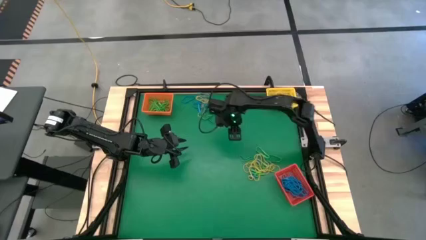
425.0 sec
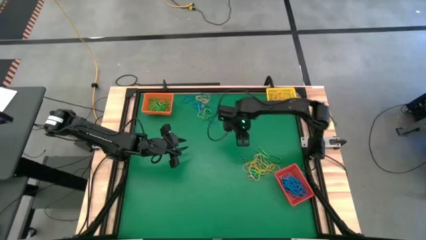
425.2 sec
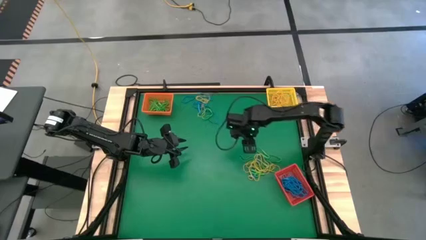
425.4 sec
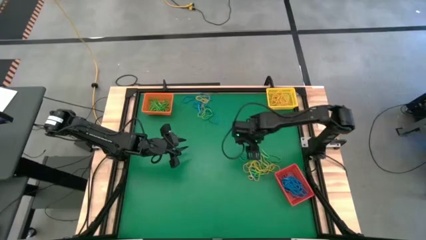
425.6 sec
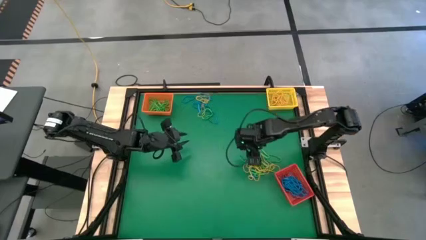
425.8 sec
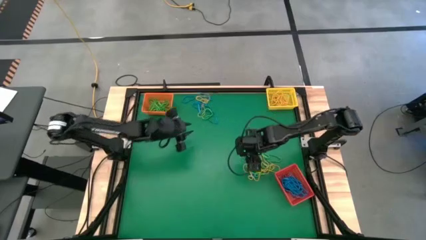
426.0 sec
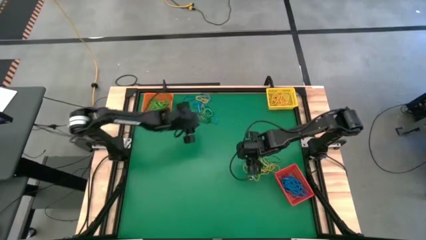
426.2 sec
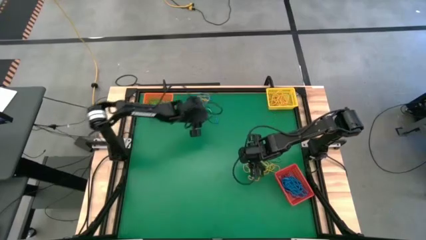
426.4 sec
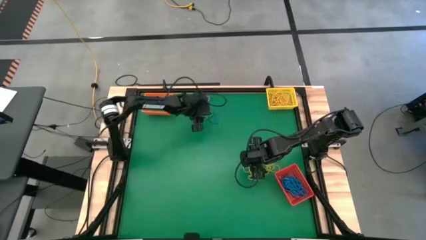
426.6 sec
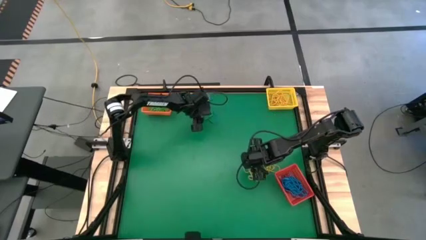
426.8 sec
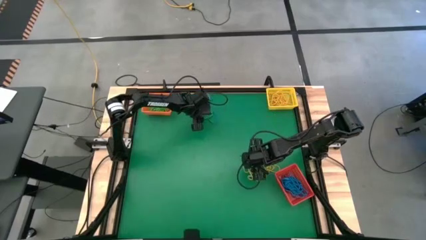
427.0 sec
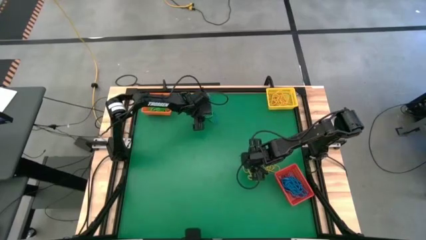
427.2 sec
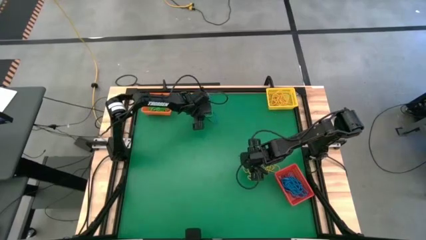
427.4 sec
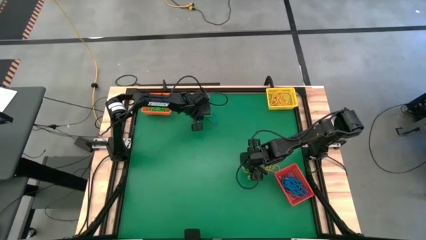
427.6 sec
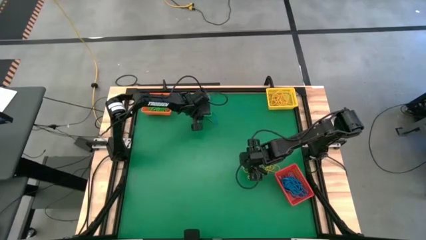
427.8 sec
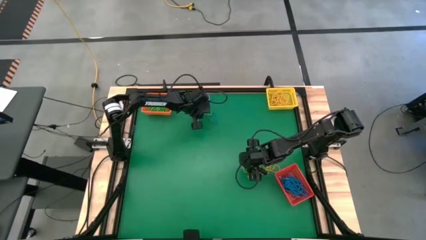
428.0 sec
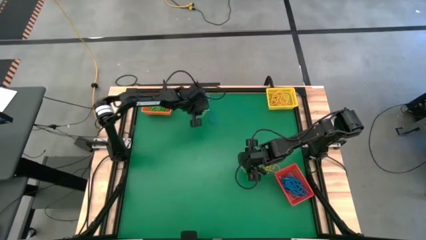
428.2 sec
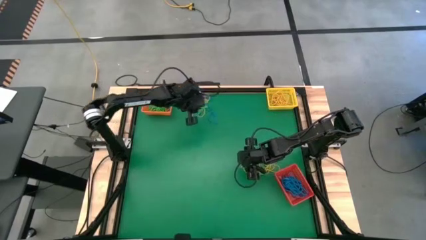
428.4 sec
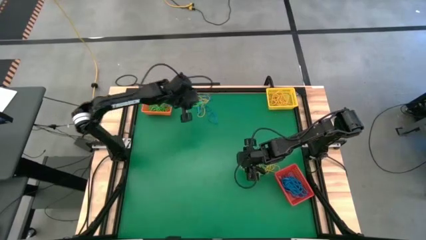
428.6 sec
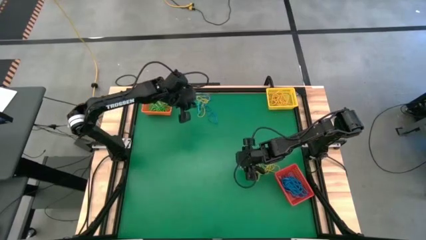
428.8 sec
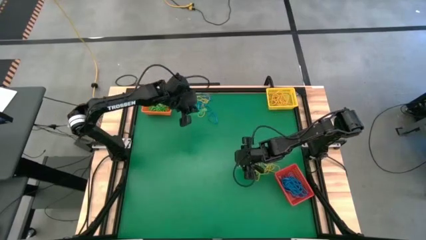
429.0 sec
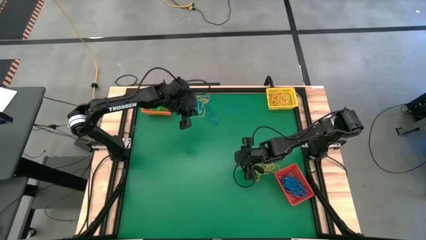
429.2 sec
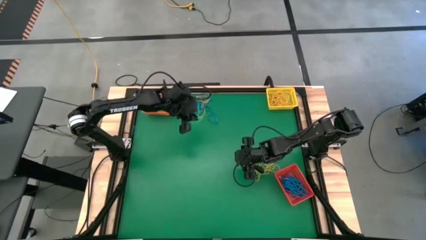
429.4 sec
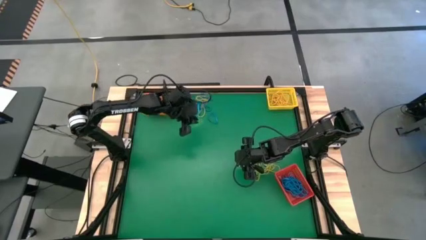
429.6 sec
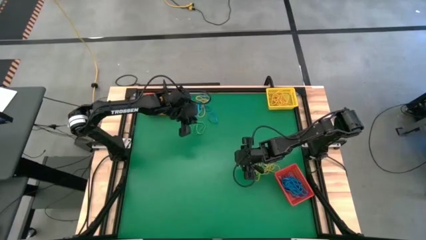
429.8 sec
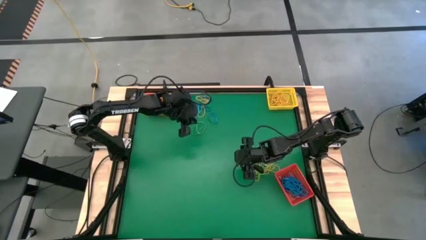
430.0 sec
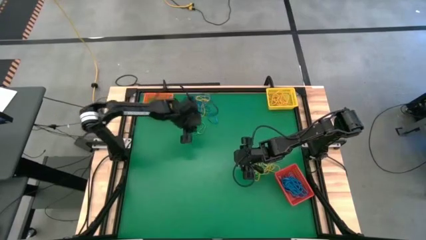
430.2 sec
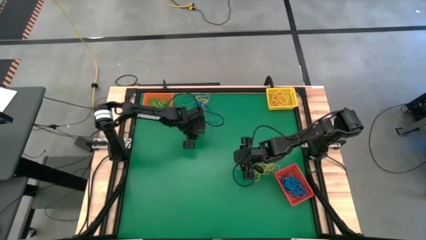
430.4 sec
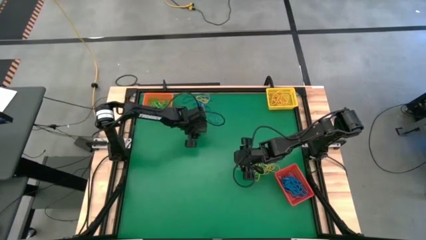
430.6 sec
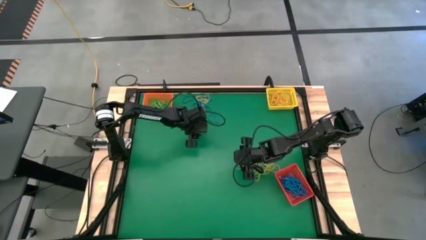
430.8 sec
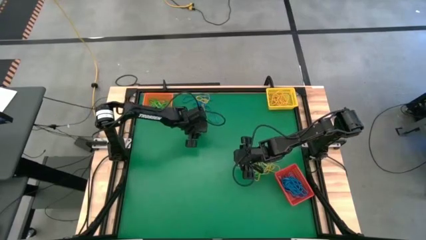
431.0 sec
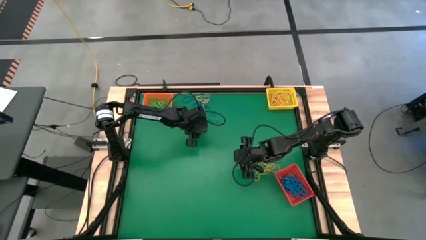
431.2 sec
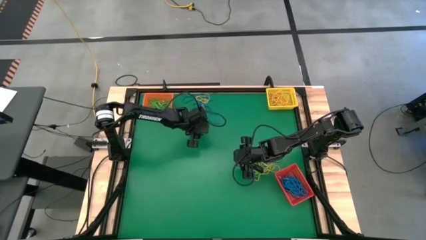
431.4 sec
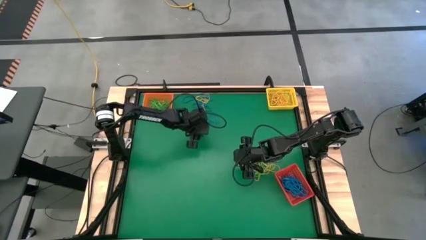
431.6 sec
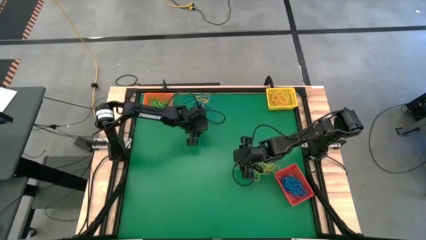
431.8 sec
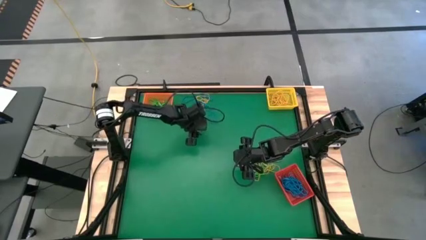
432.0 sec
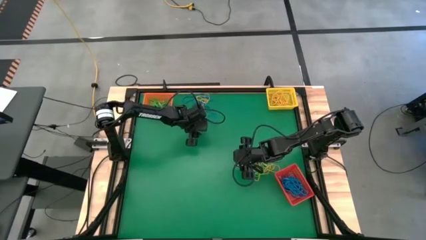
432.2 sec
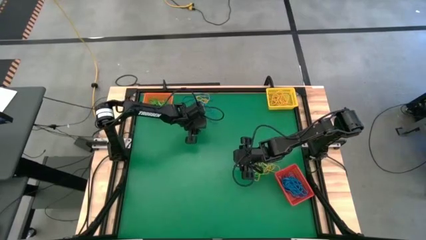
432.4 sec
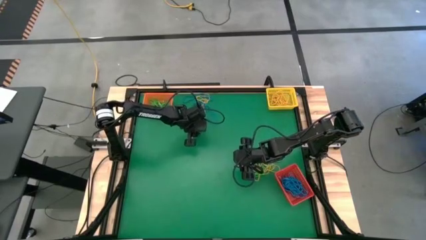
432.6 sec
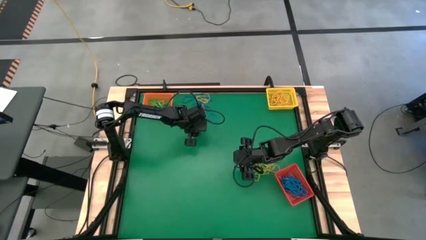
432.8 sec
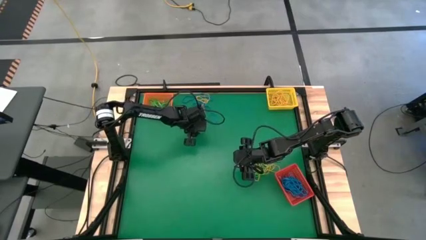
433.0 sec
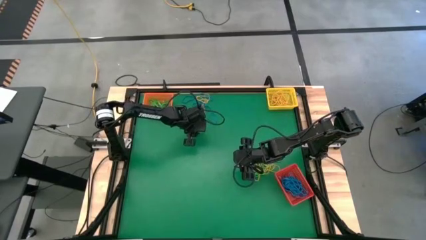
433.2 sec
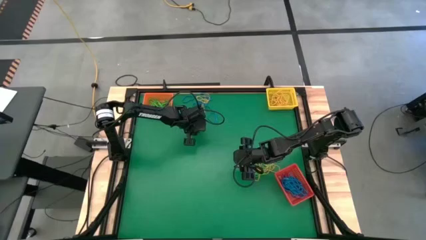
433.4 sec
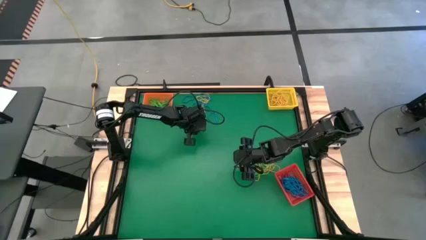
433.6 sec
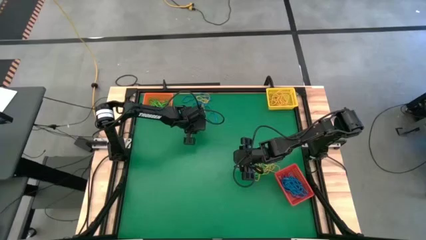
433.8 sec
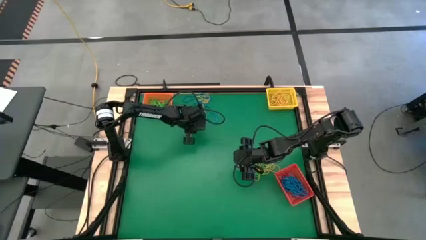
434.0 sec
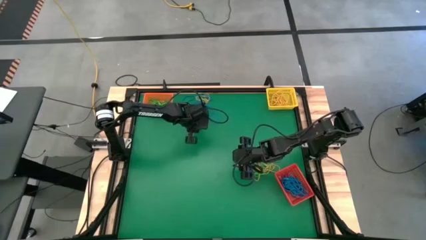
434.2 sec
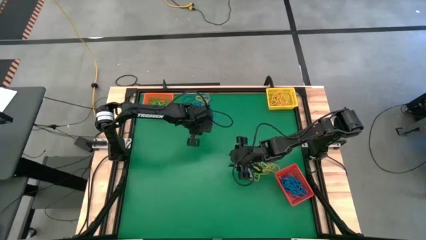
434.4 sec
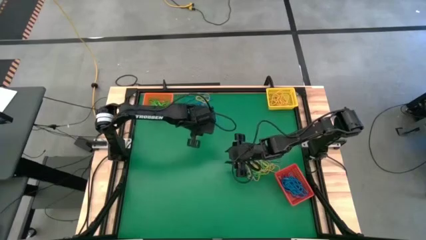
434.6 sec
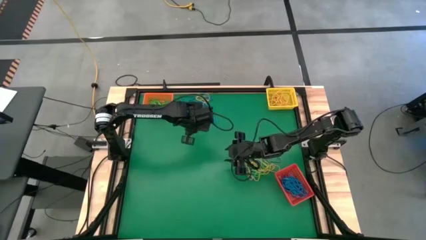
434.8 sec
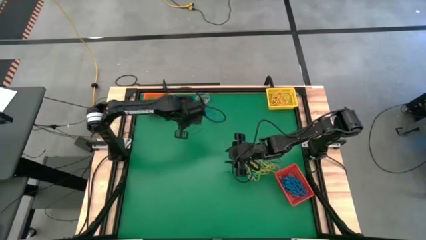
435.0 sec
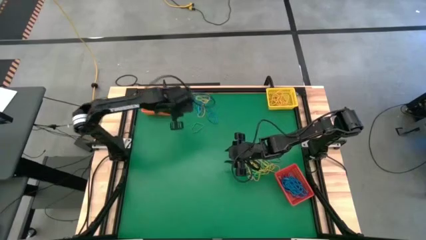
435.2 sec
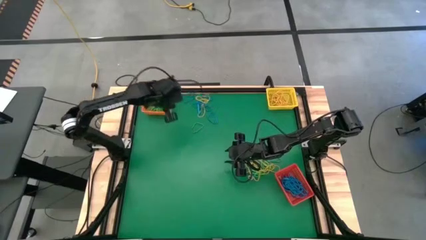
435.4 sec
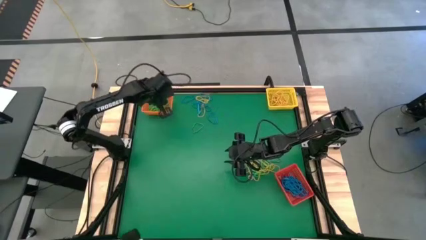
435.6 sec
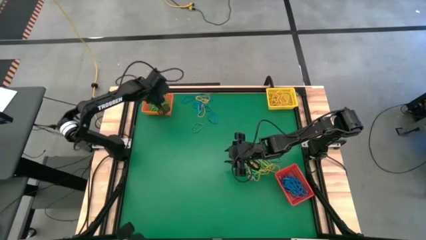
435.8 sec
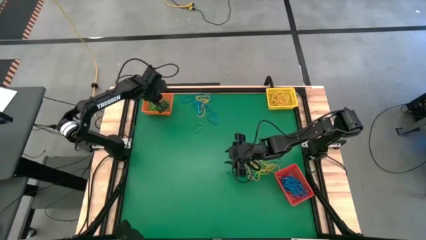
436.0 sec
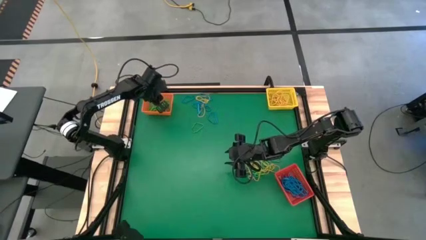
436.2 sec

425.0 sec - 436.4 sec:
Task: Sort rubber bands into baskets
Put the green rubber band into the orange bin

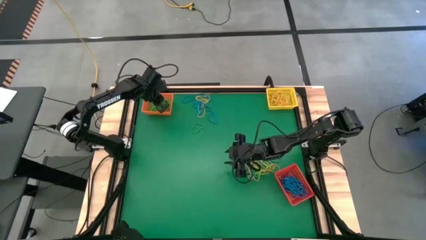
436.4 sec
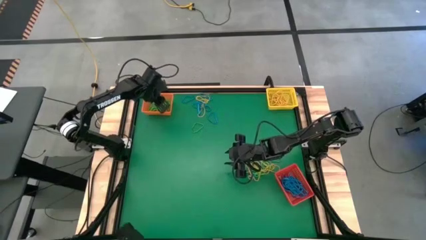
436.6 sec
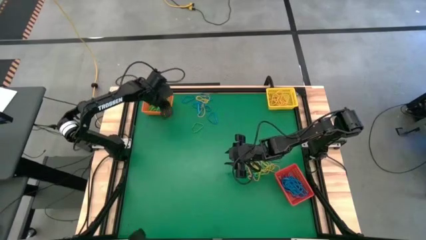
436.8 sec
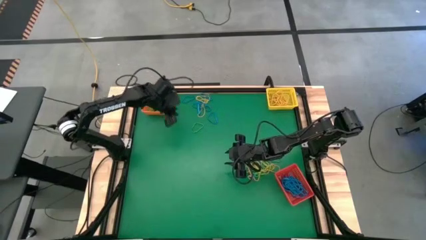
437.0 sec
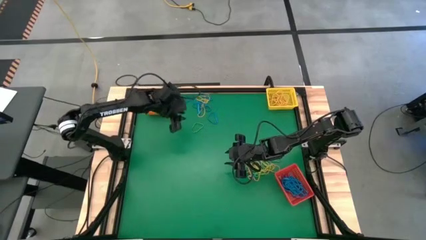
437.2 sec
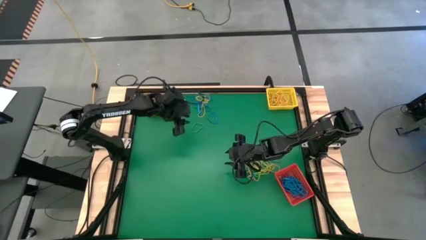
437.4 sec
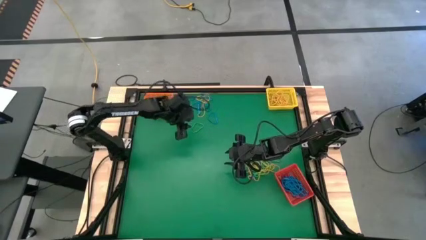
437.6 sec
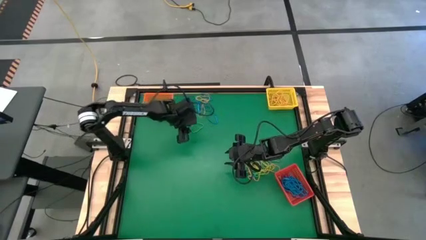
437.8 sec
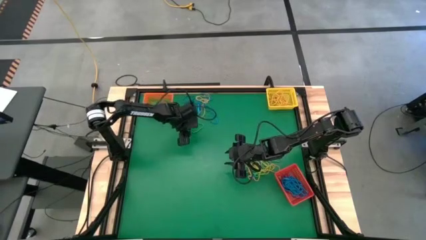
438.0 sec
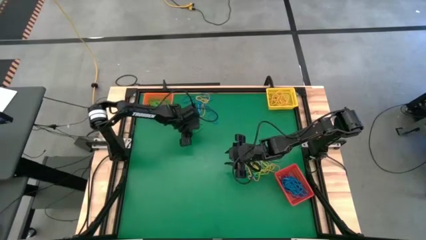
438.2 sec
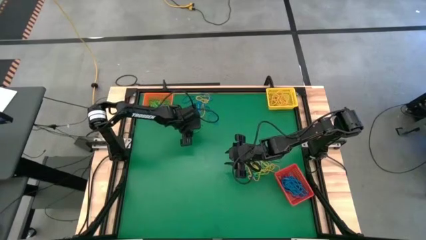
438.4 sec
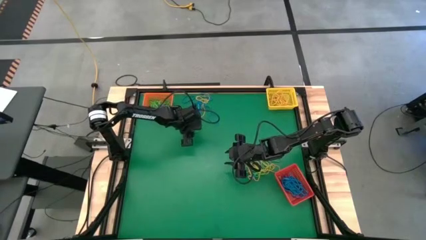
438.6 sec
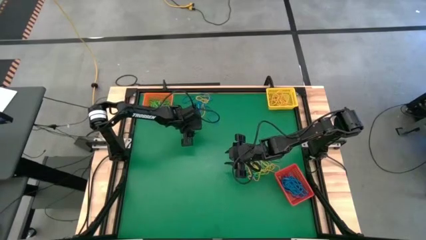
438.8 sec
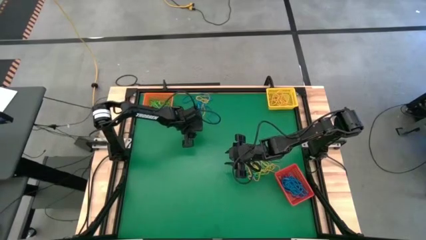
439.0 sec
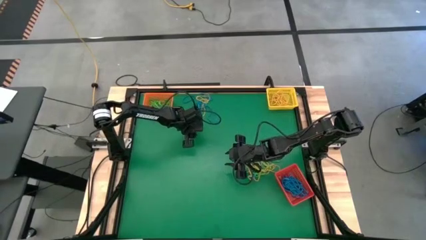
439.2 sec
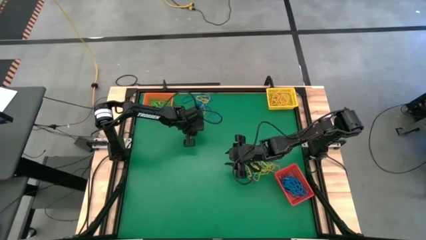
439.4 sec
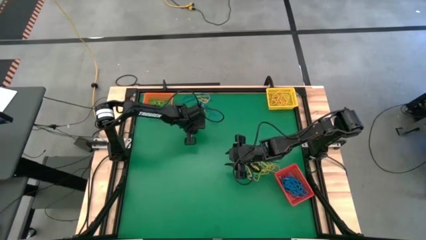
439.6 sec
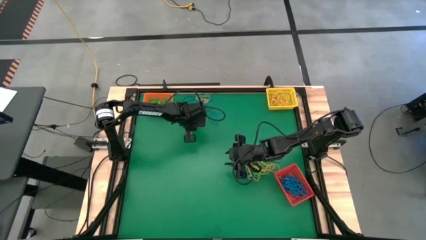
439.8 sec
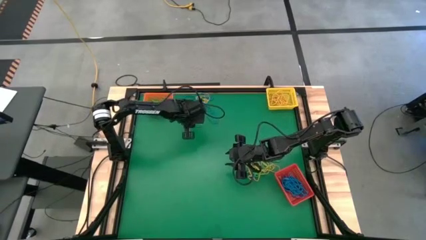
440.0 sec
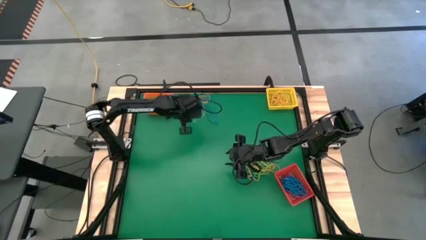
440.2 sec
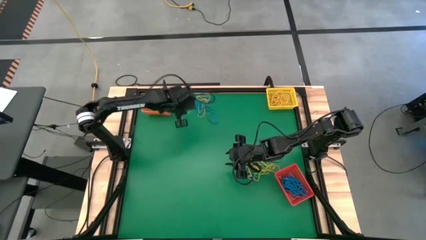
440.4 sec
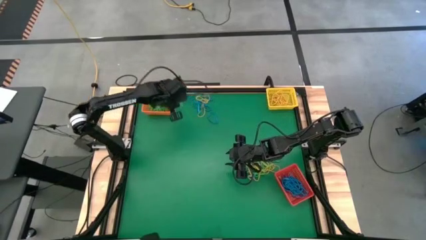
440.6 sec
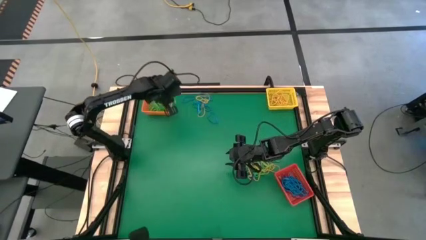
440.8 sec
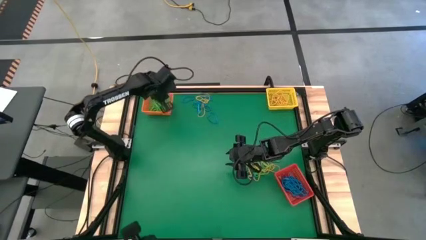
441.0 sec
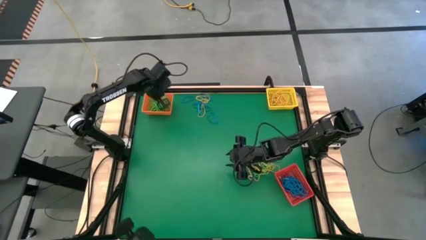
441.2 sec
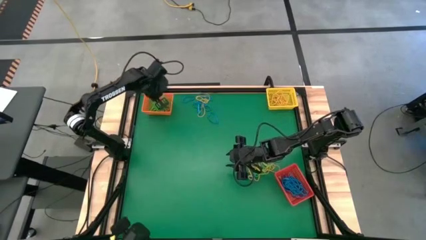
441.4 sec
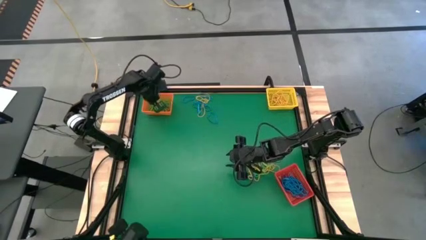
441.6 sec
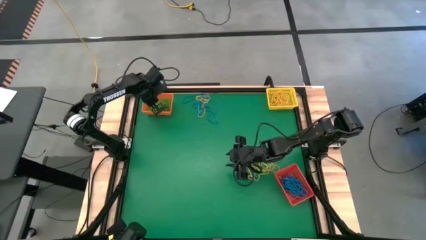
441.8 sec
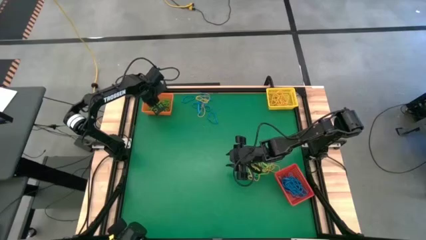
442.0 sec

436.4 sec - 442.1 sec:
Put the green rubber band into the orange bin
